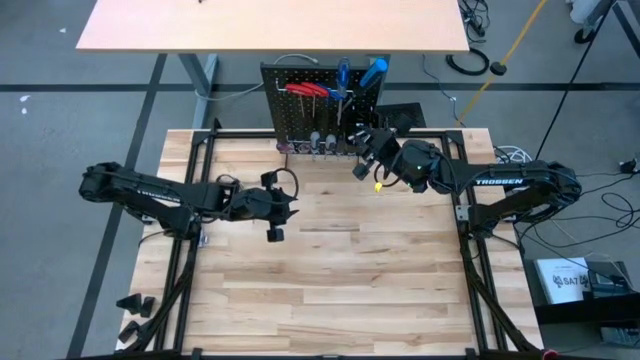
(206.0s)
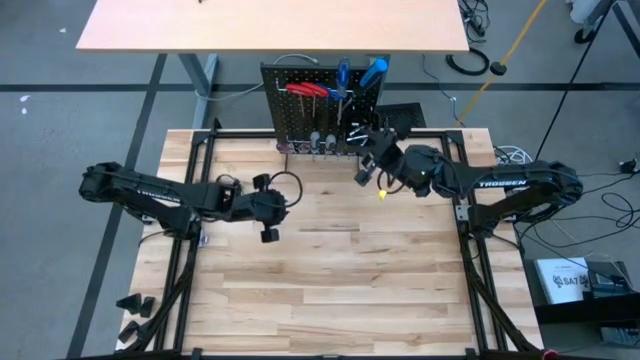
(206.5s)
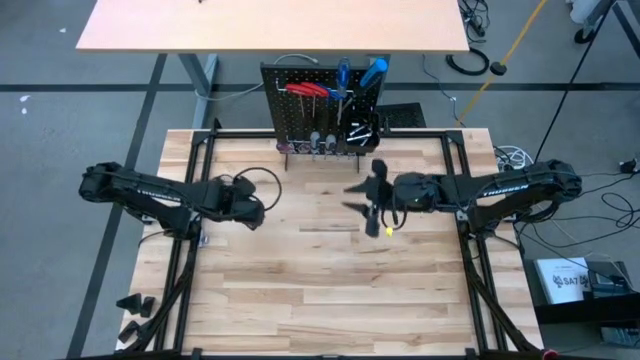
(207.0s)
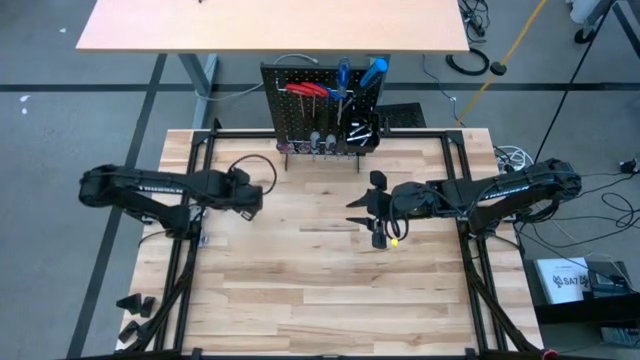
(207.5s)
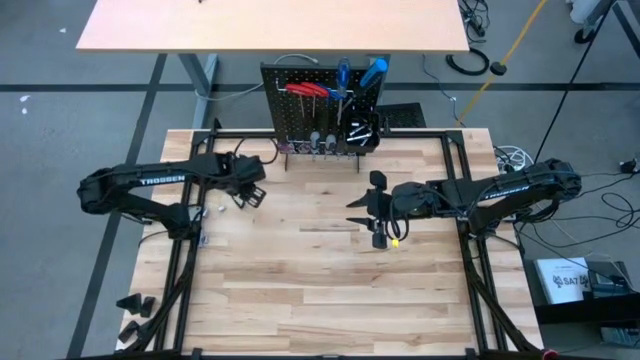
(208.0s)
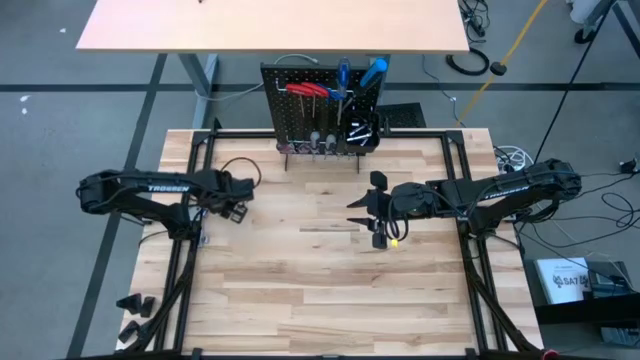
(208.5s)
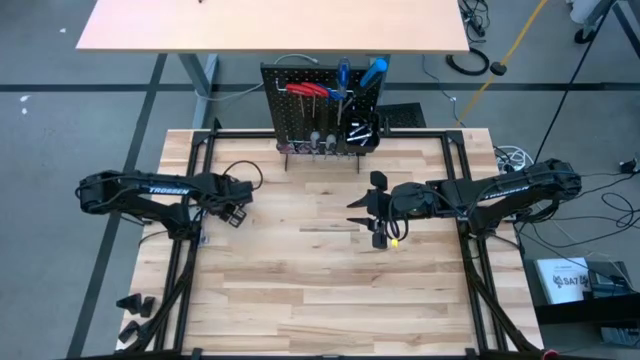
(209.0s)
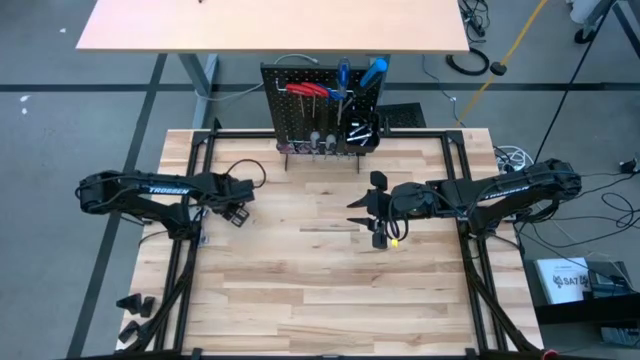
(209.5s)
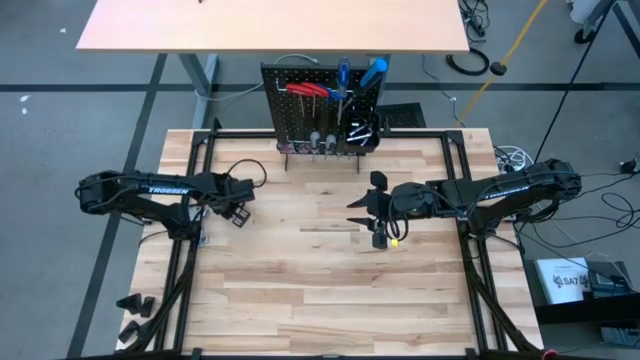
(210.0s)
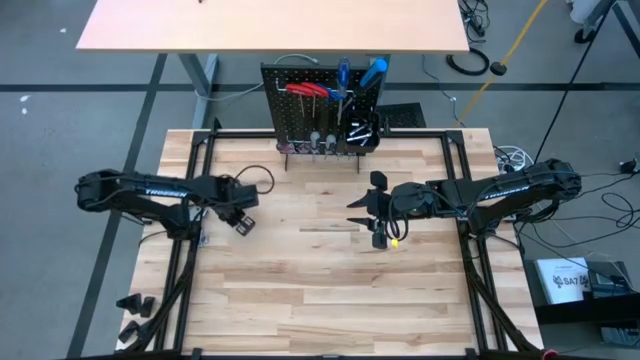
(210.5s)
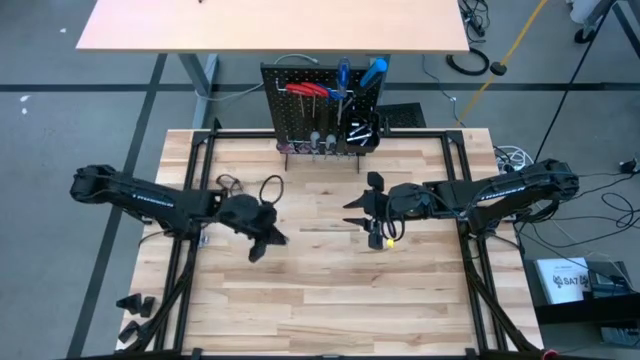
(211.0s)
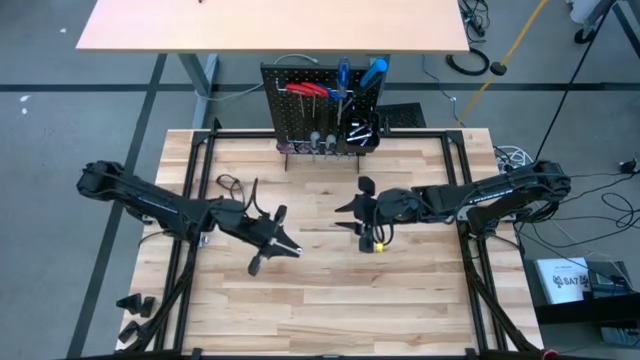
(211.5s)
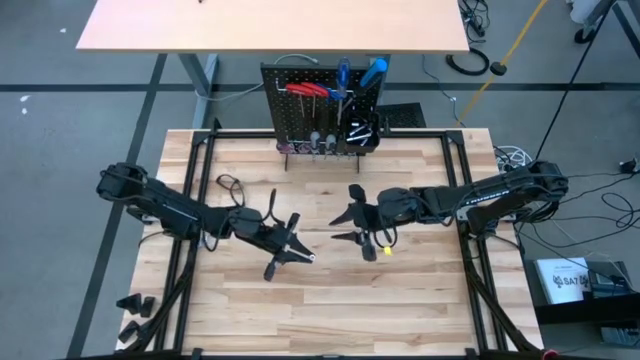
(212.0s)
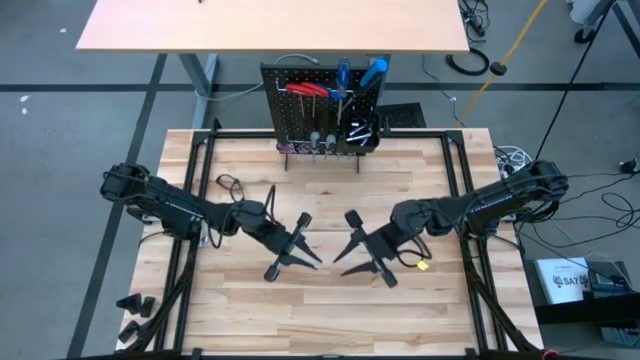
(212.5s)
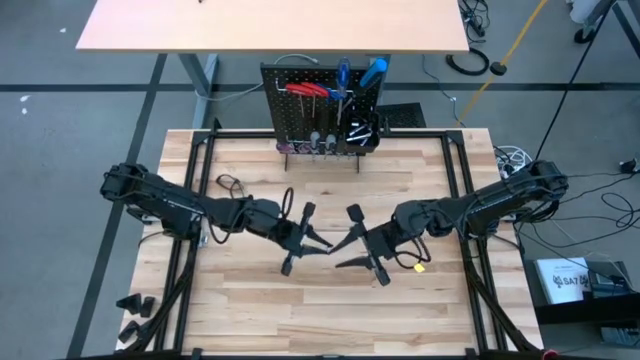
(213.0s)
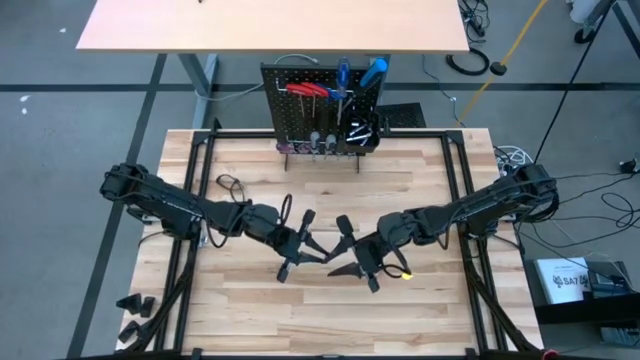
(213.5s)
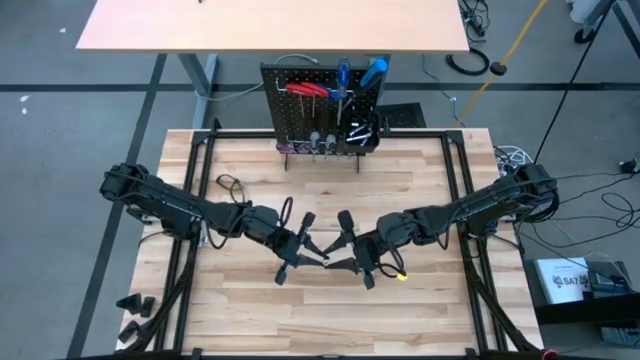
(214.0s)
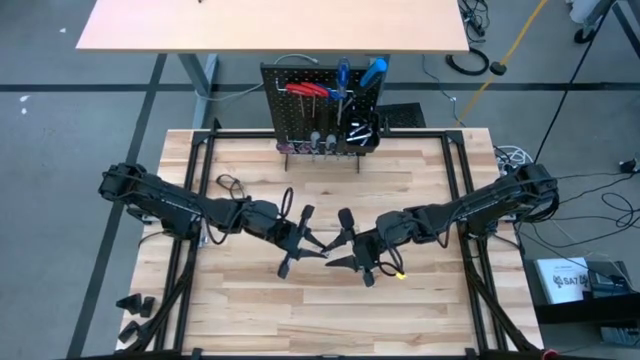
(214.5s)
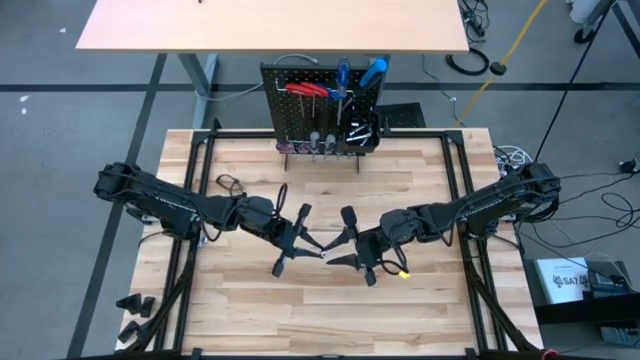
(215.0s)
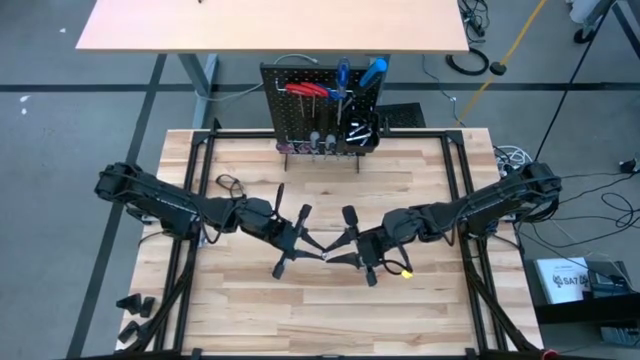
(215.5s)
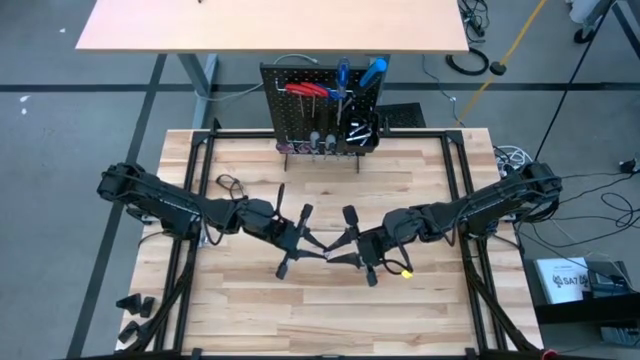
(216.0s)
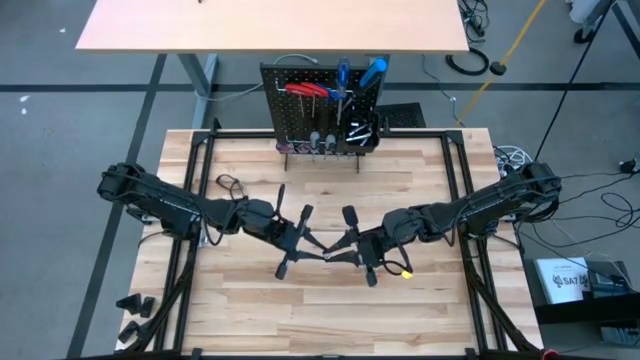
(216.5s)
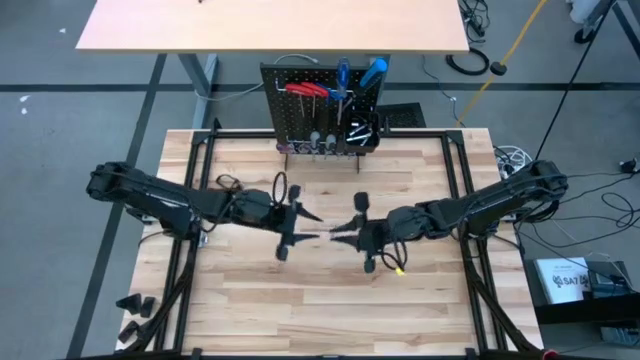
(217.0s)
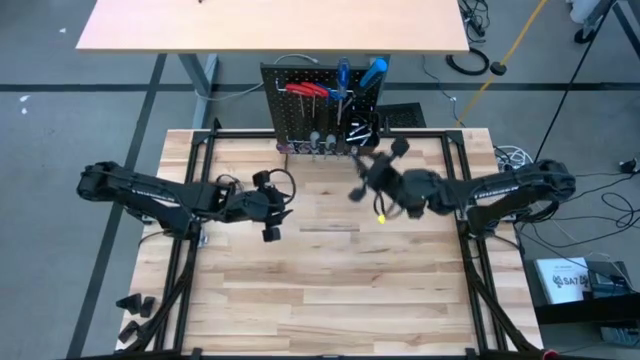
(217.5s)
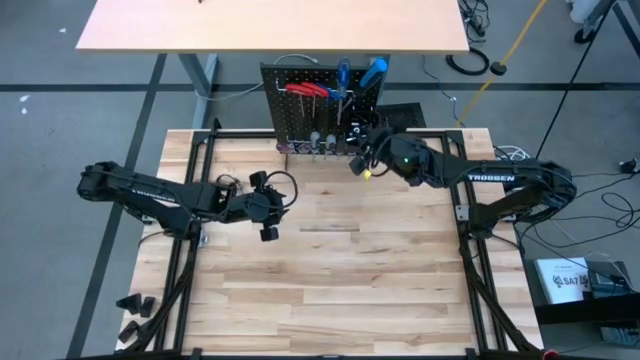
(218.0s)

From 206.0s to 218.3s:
Task: Hang tools onto peg board
Put the socket wrench into the black bin on the peg board

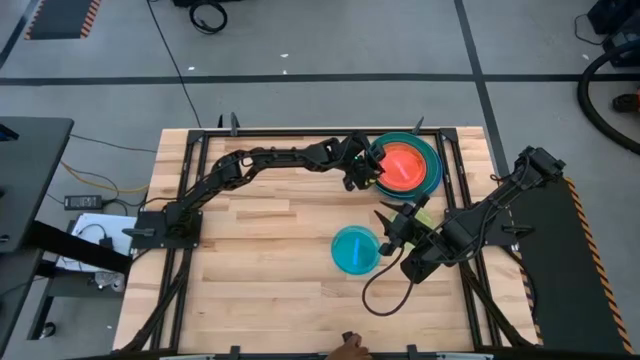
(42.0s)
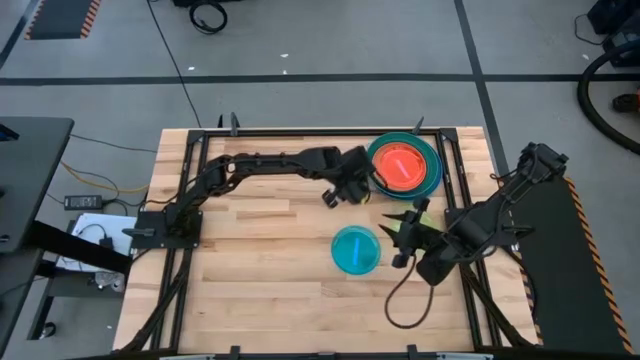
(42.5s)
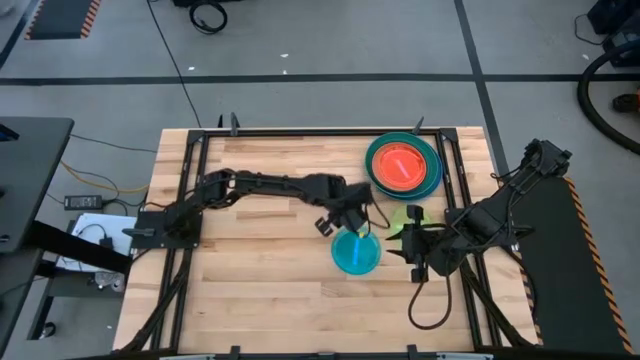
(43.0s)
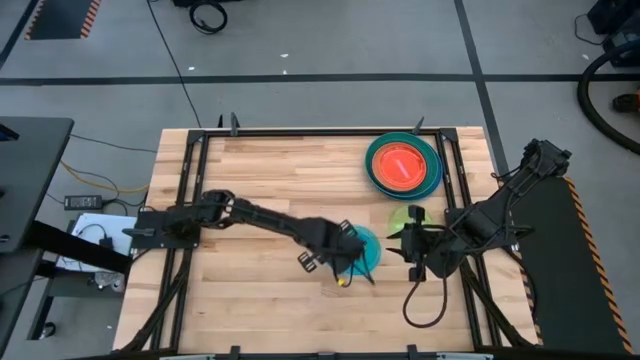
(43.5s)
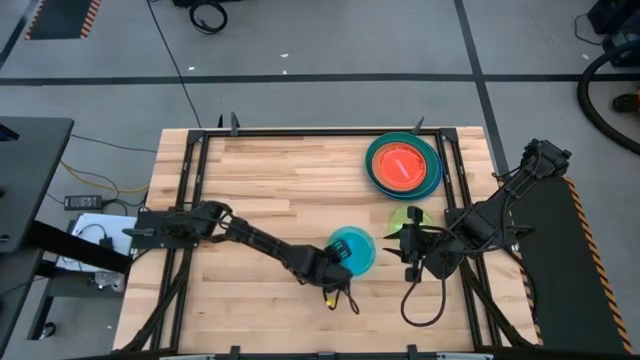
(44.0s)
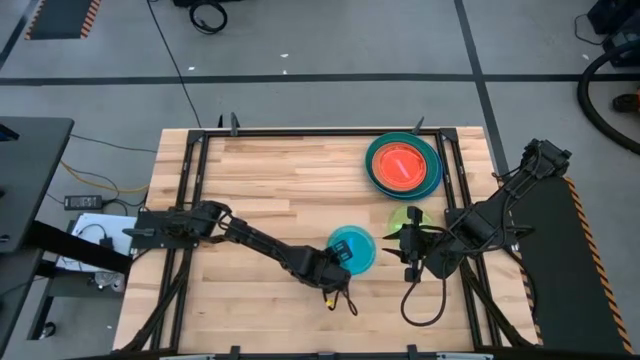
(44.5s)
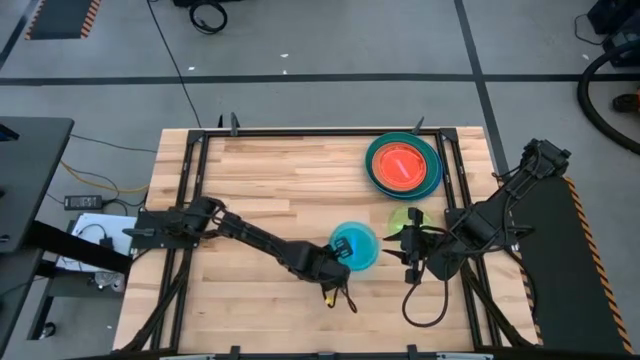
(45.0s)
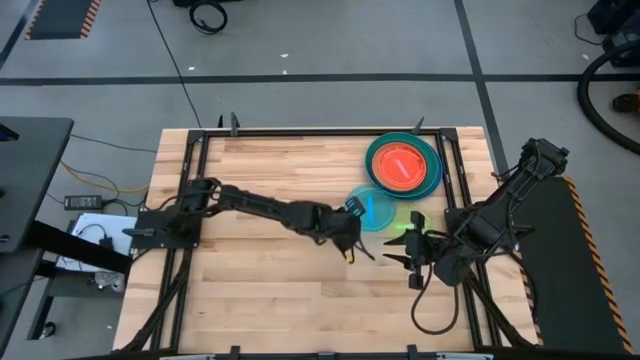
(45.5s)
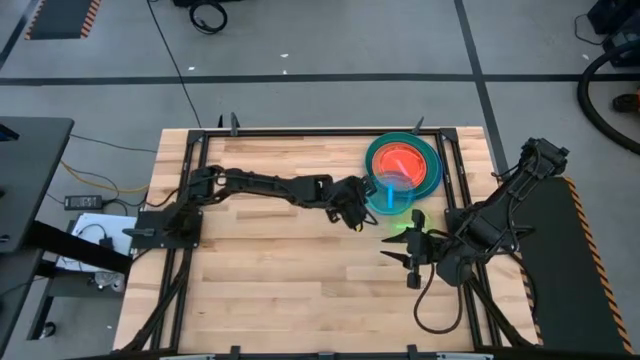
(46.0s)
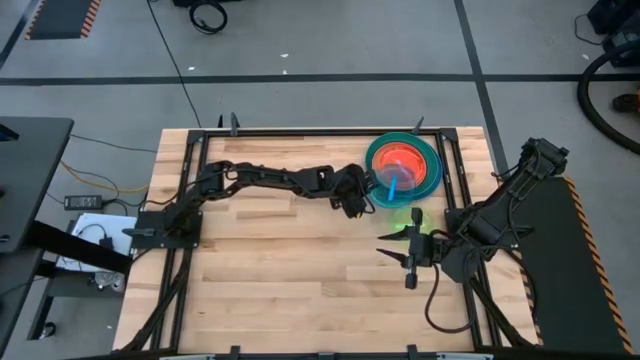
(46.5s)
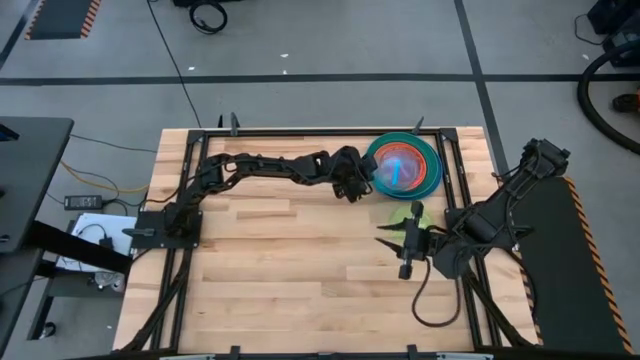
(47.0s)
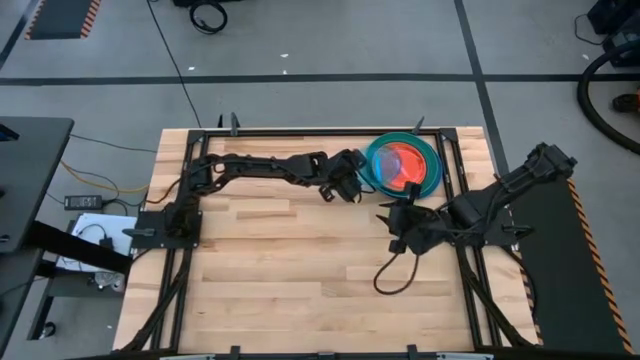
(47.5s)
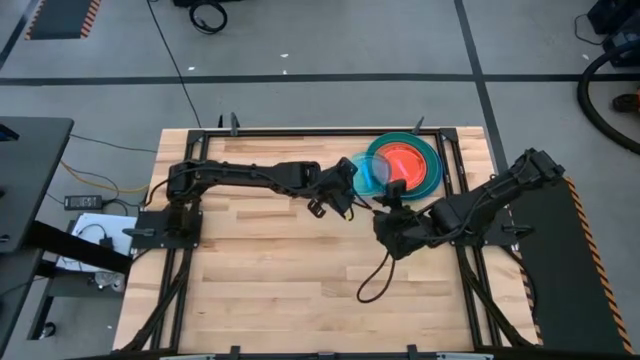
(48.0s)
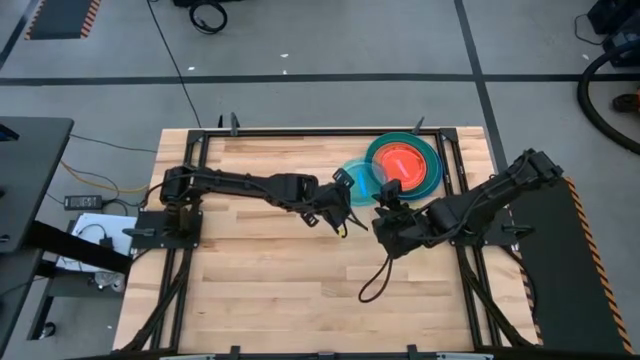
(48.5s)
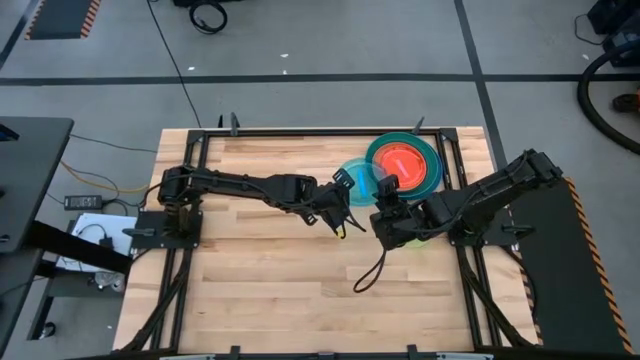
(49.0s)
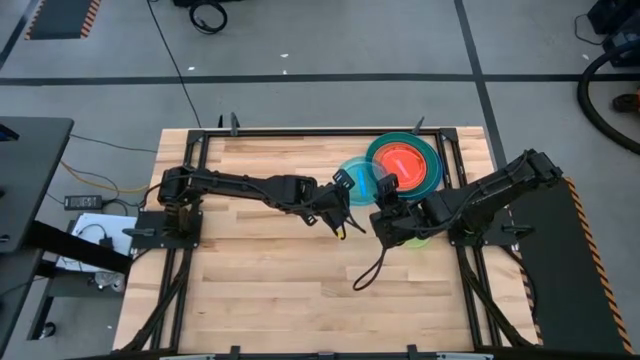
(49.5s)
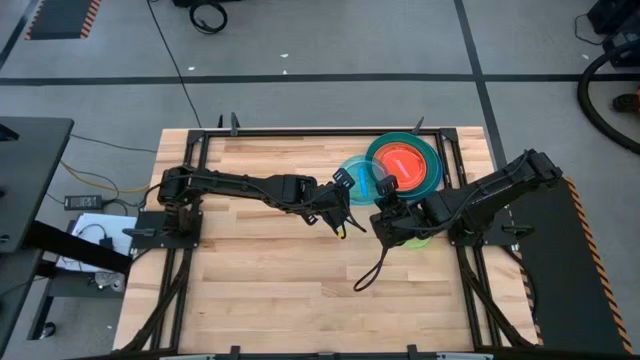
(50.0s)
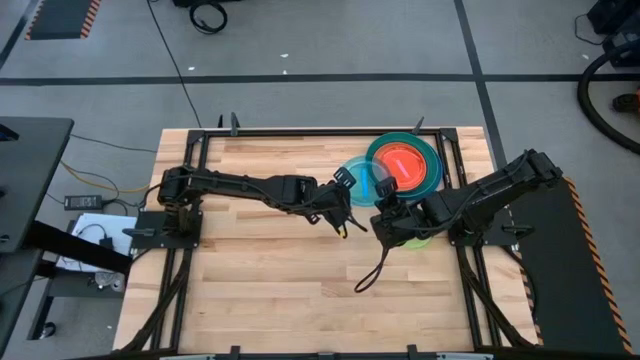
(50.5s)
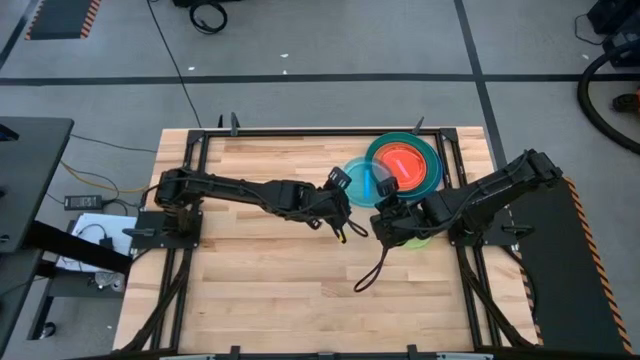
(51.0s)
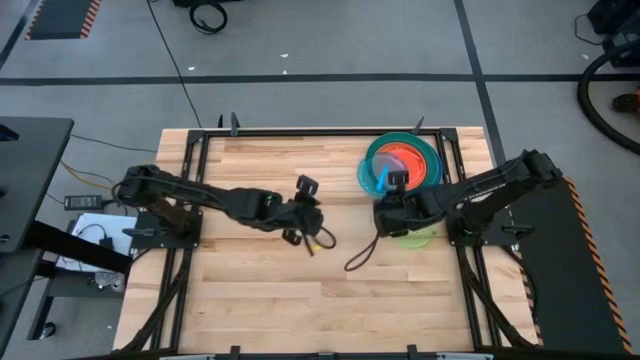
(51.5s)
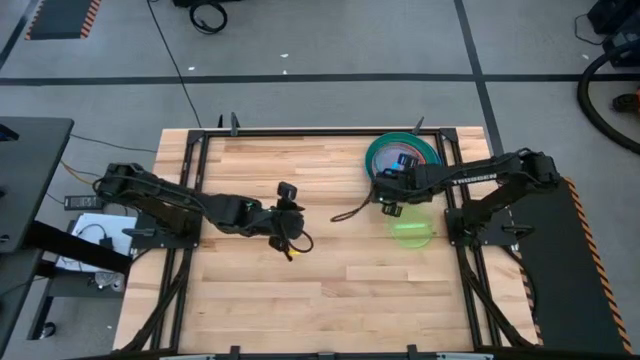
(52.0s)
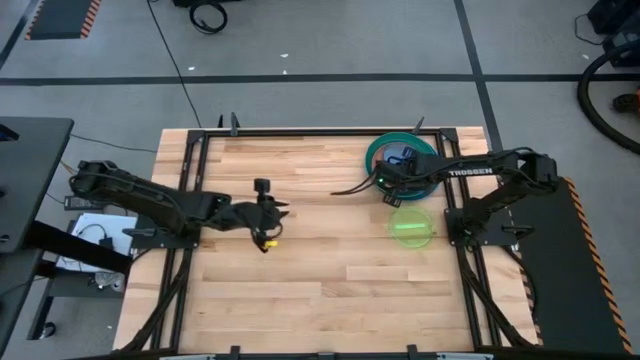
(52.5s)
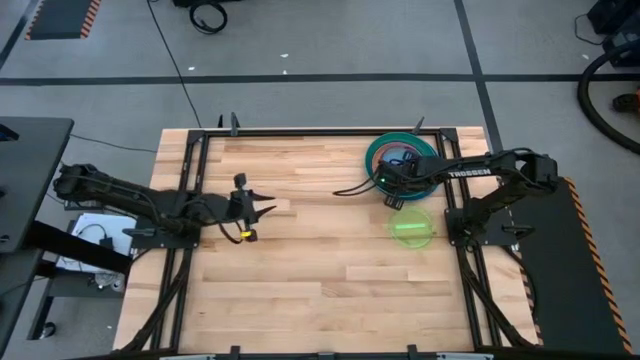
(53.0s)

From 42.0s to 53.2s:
Task: Stack plastic plates
Stack the light blue plate on top of the pink plate
